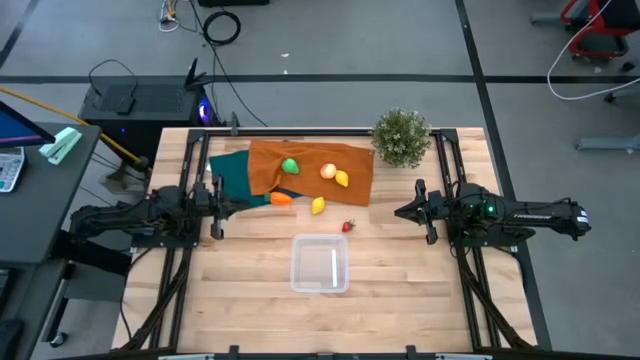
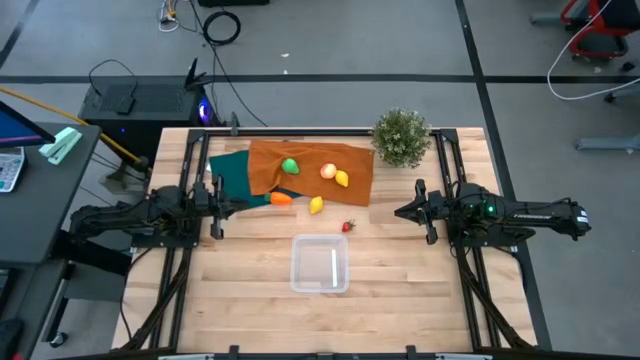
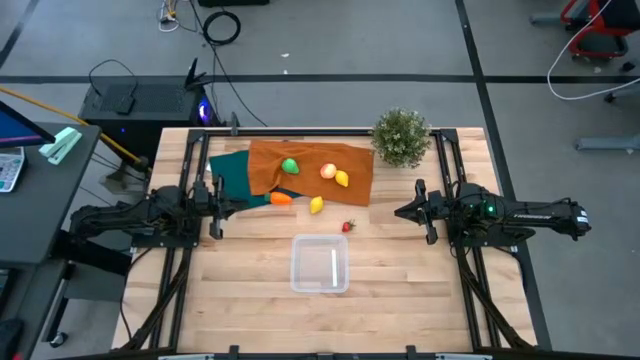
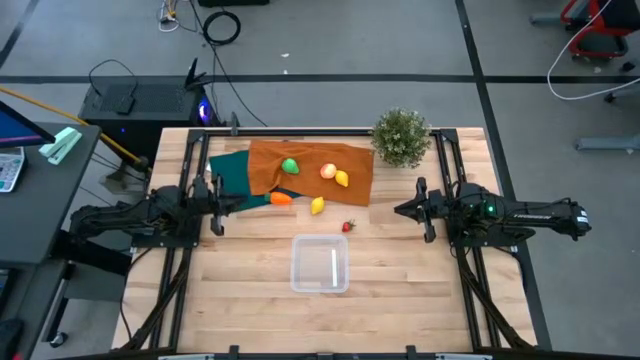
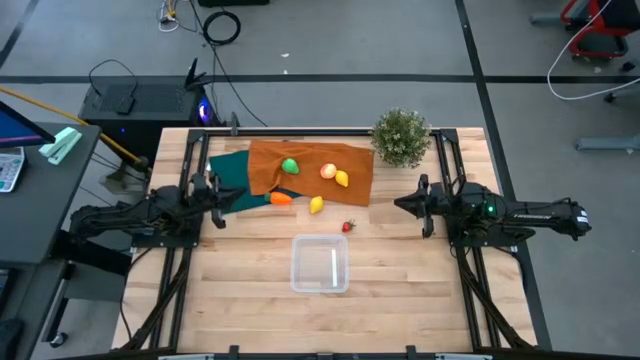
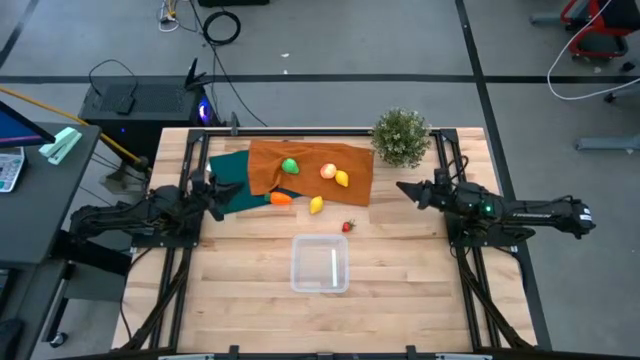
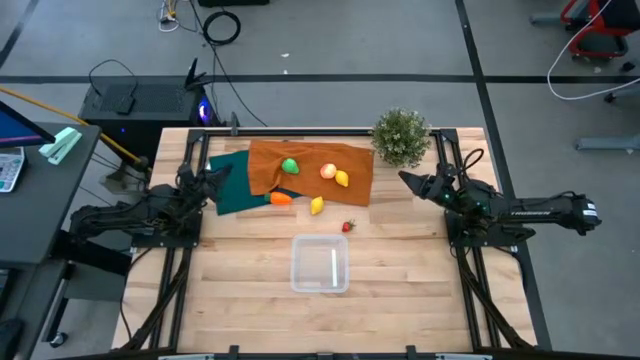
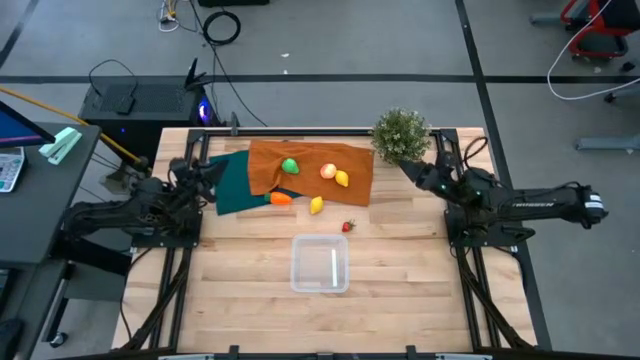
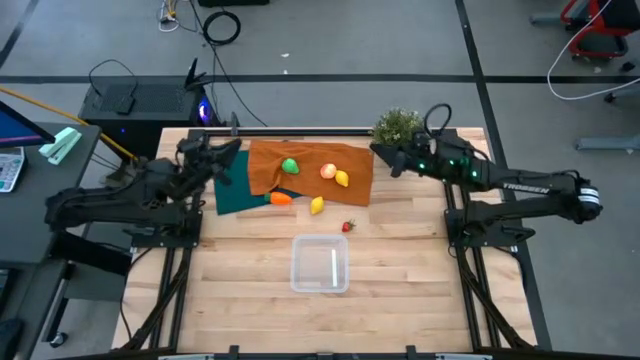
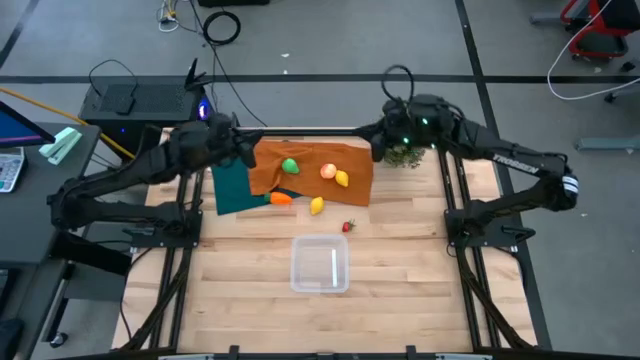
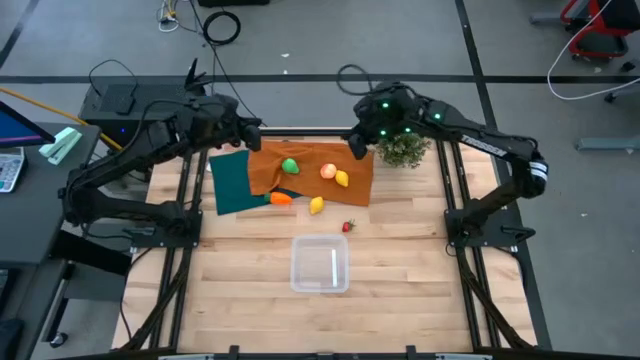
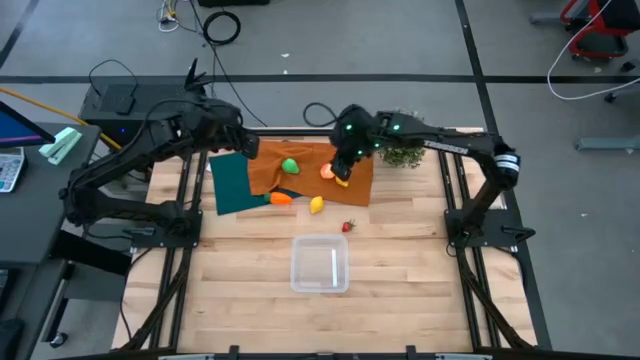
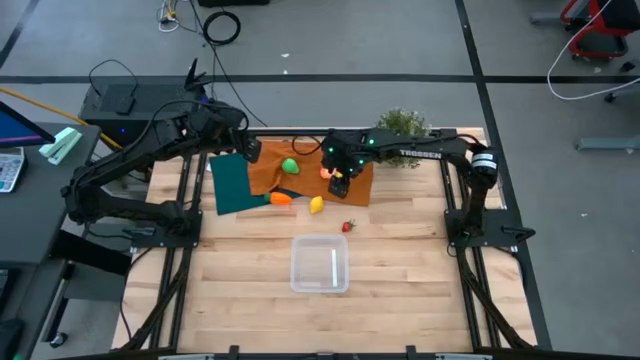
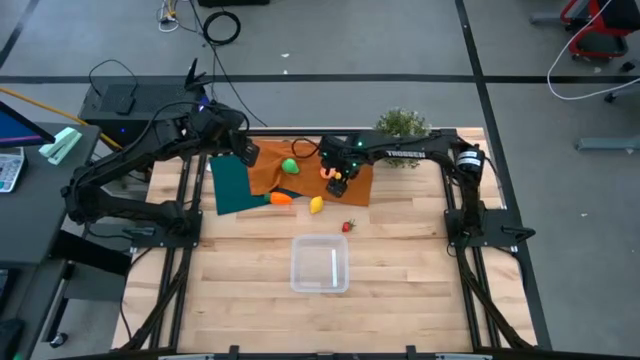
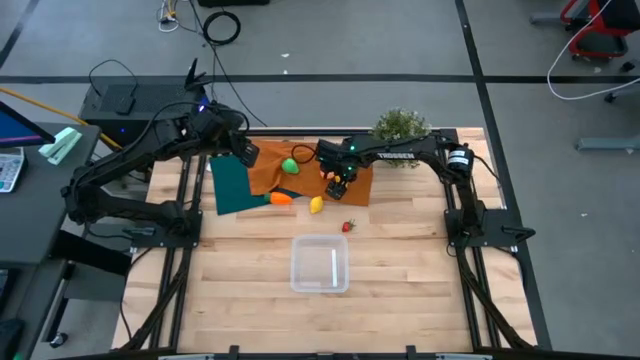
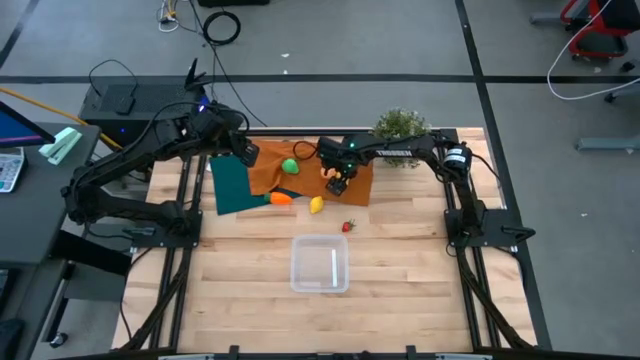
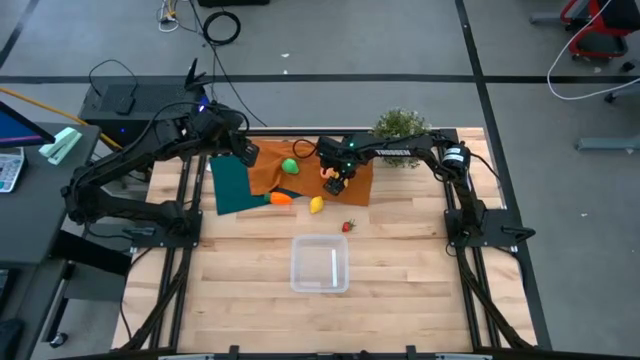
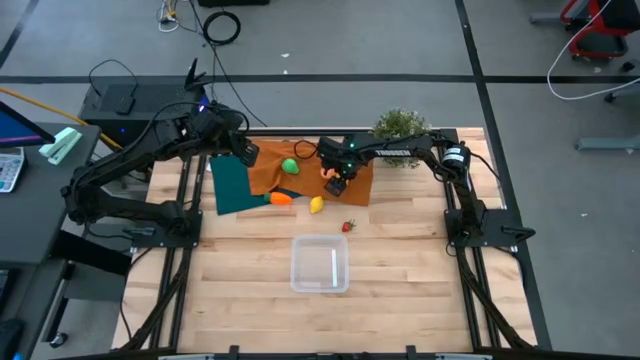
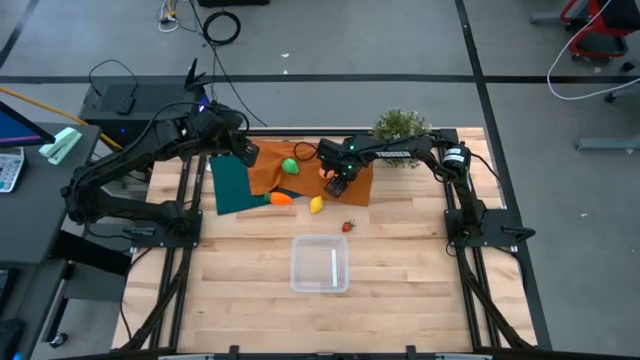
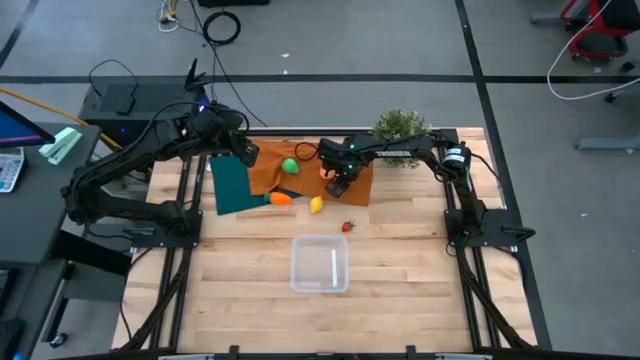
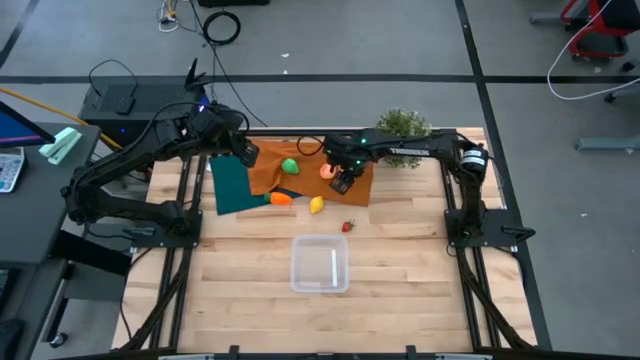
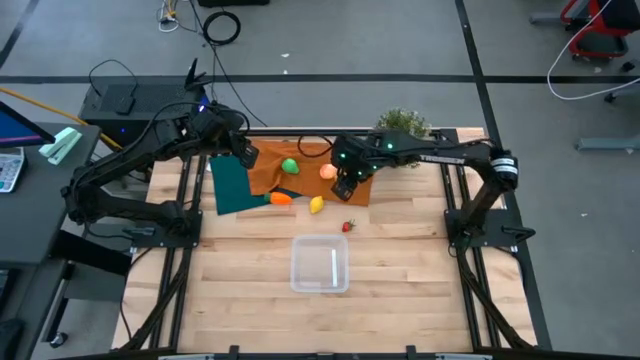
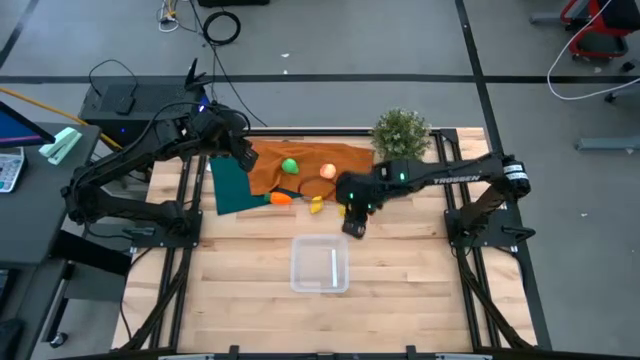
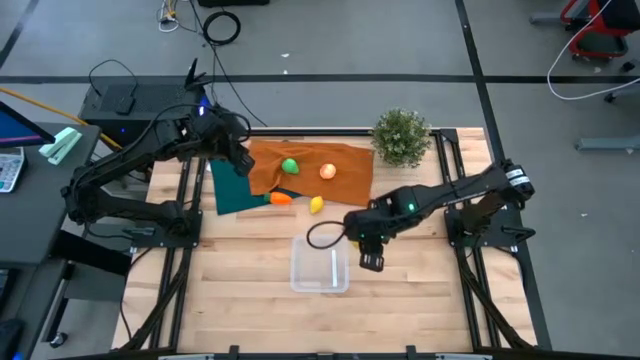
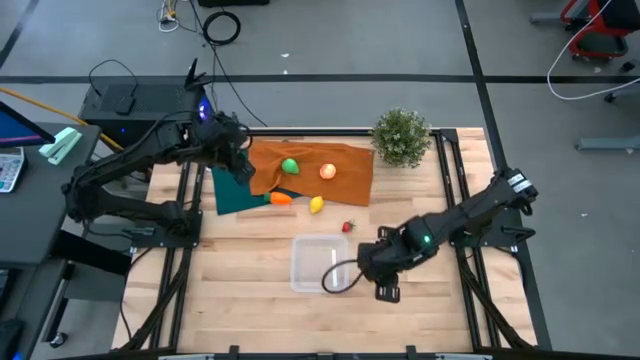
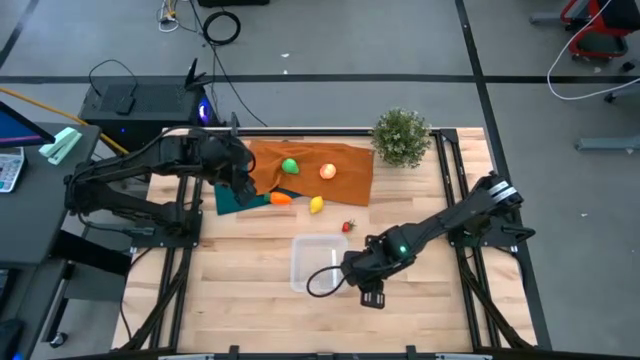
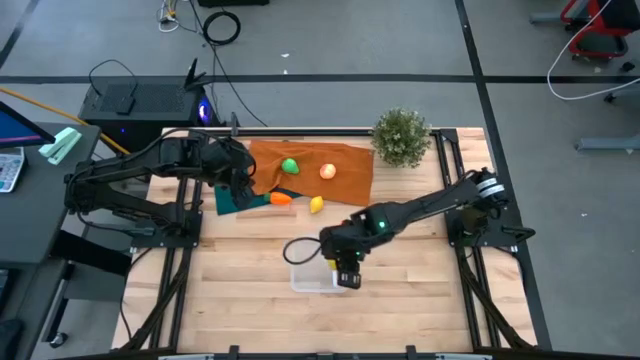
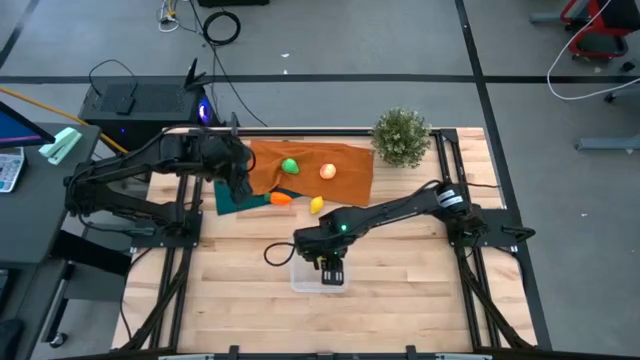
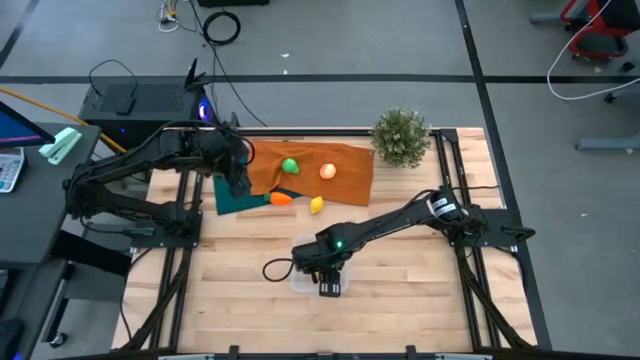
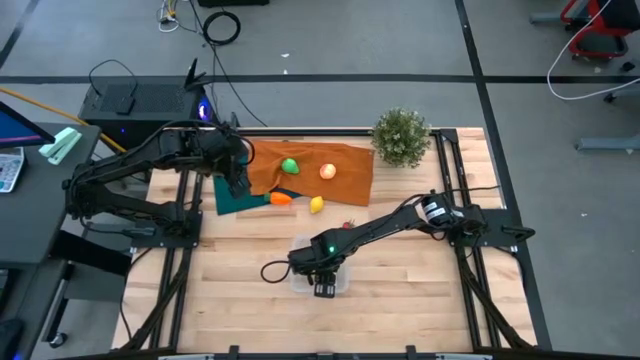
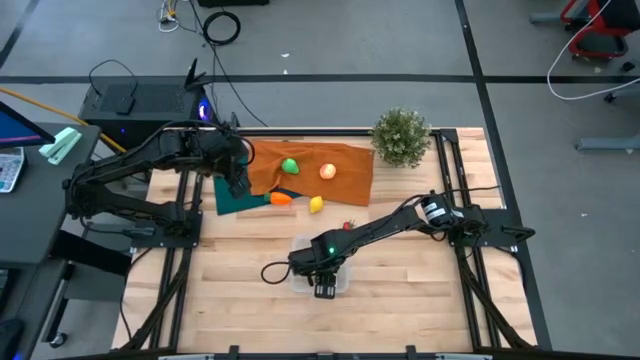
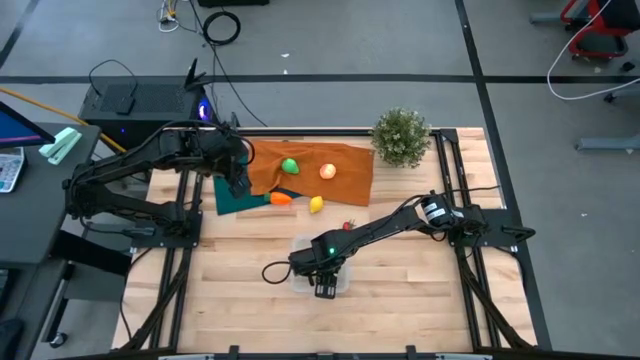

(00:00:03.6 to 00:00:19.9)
Task: Pick and placing Produce into tupperware
Put the top yellow lemon into the transparent container

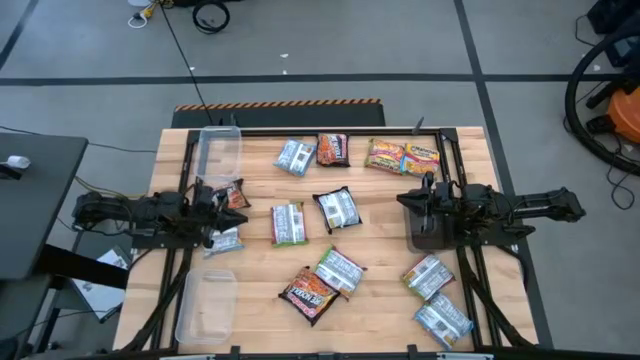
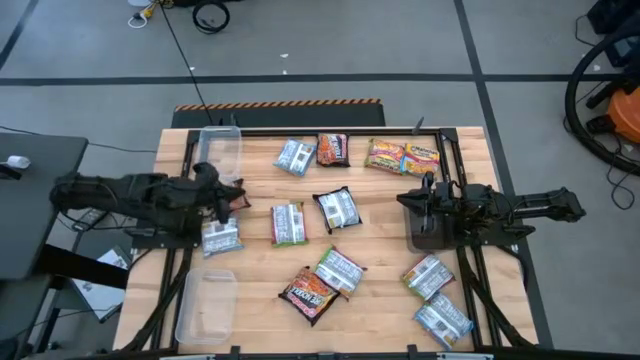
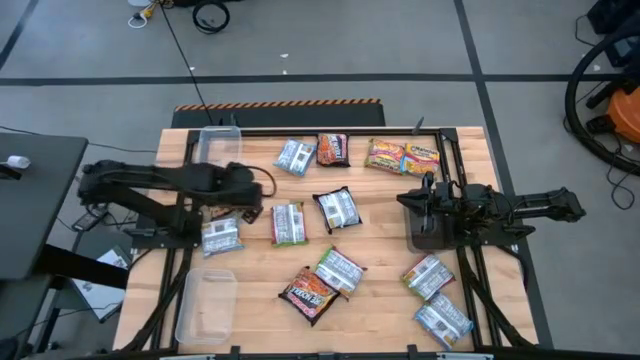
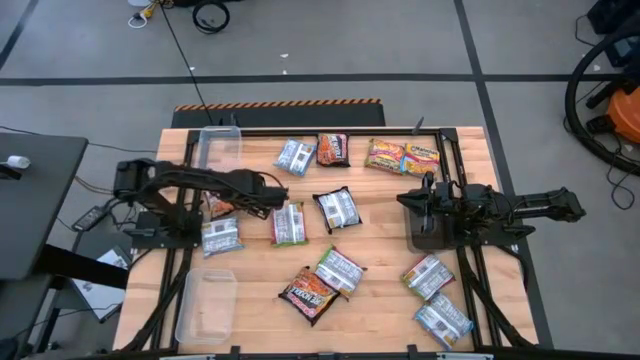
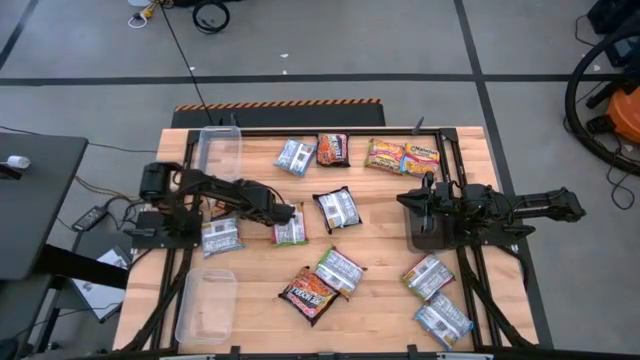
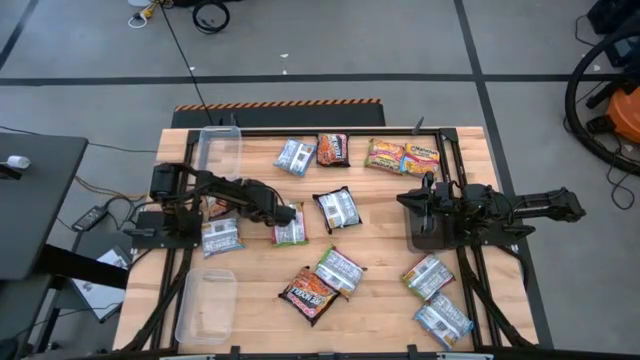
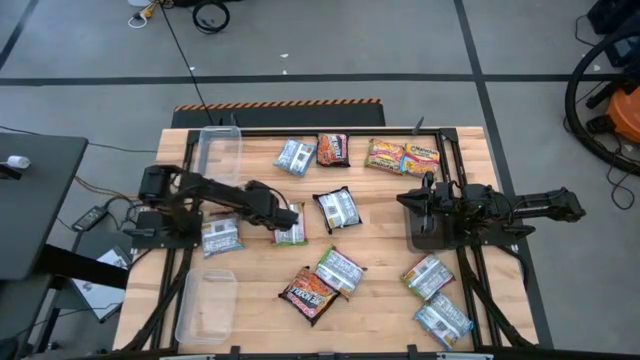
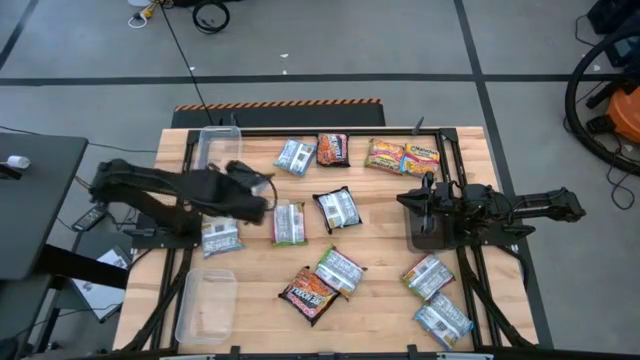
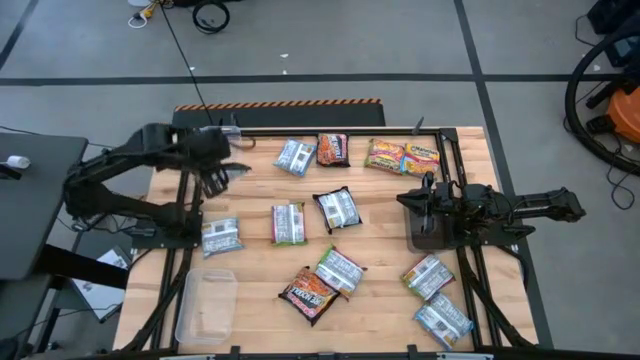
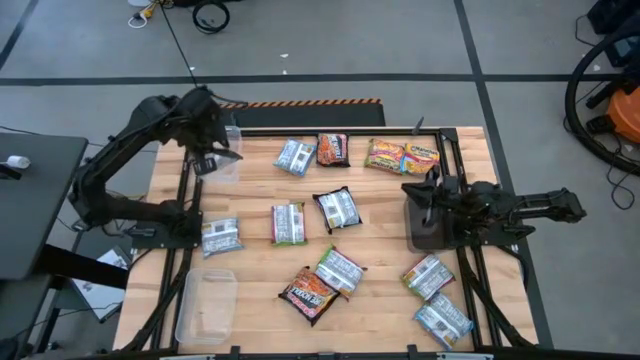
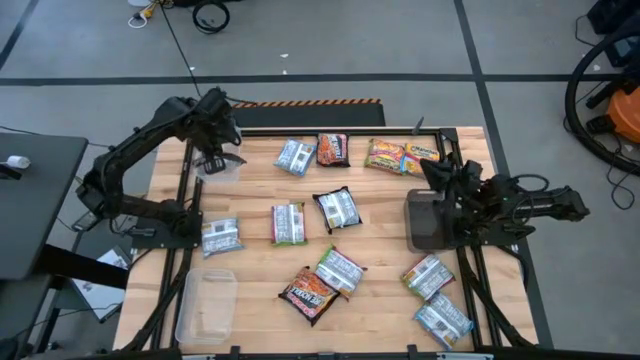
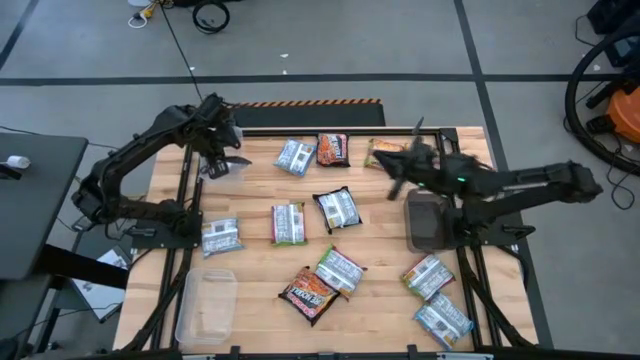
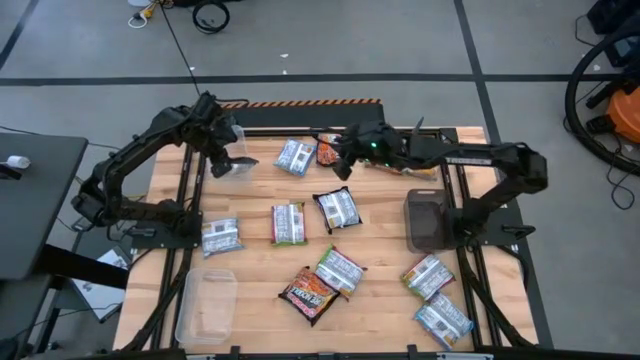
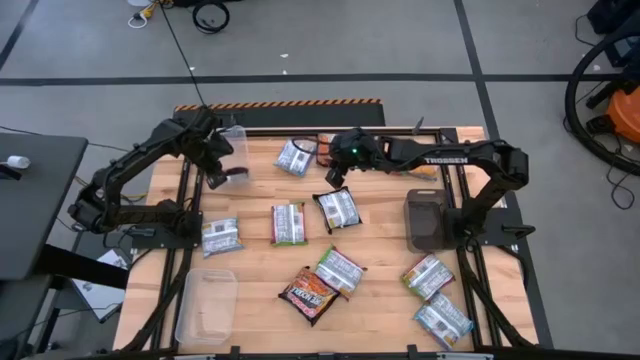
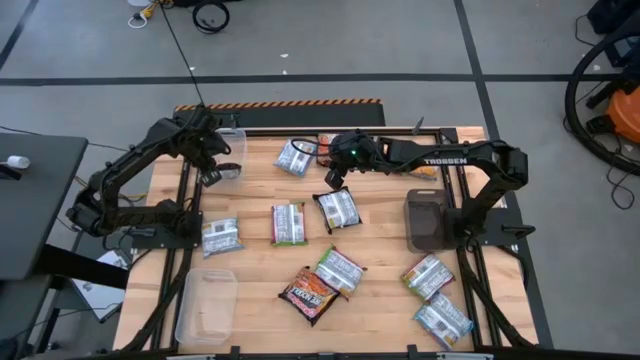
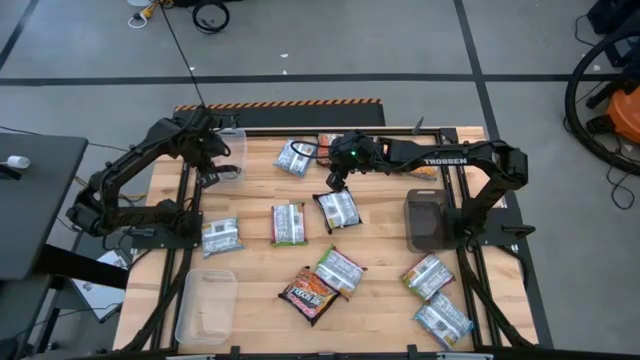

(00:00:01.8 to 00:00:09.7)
Task: Sort Maruchan noodles
Put the black noodle pack into the top transparent bin
